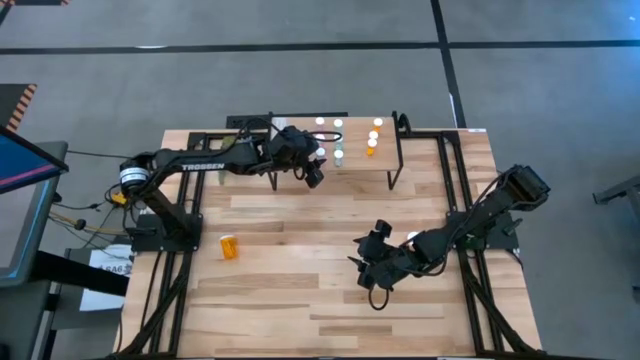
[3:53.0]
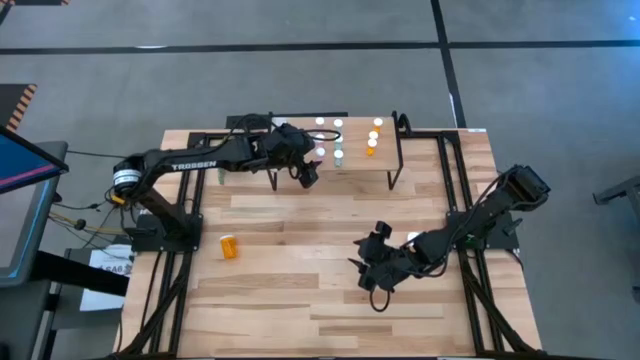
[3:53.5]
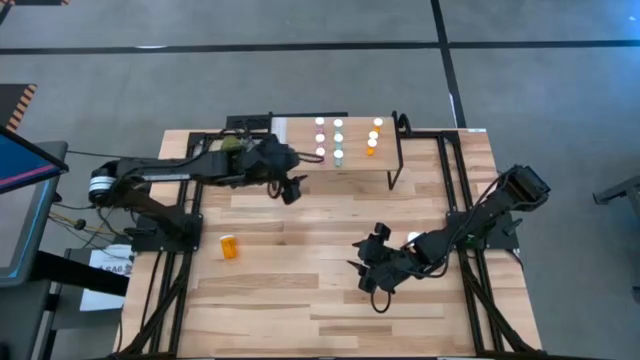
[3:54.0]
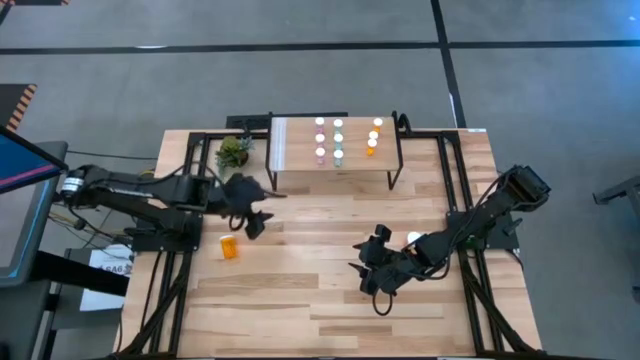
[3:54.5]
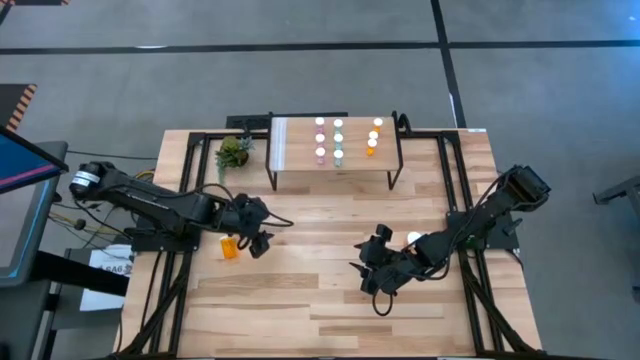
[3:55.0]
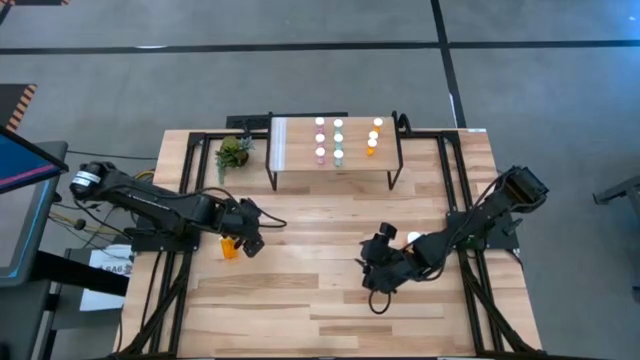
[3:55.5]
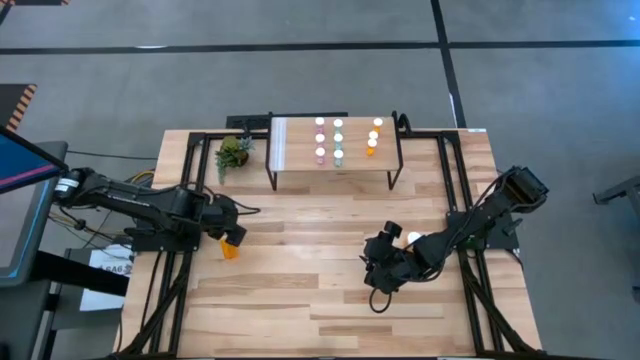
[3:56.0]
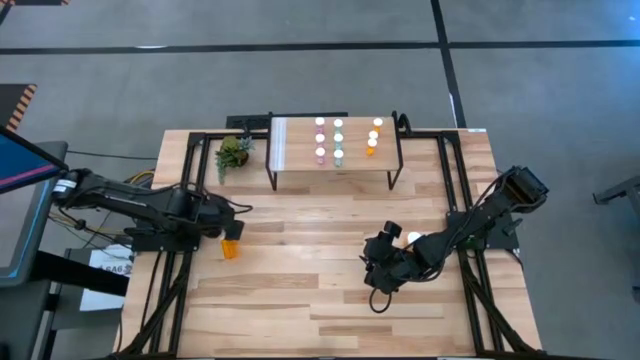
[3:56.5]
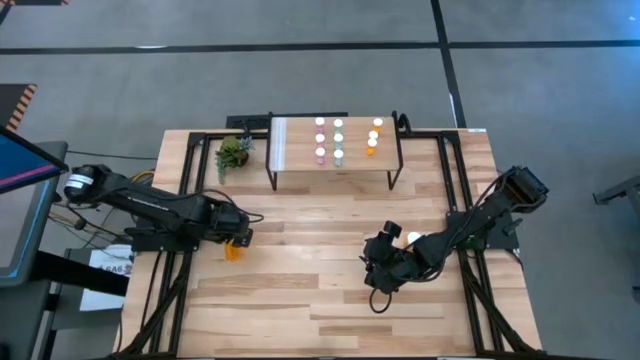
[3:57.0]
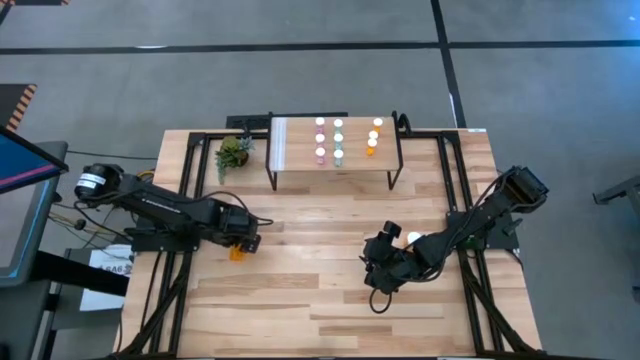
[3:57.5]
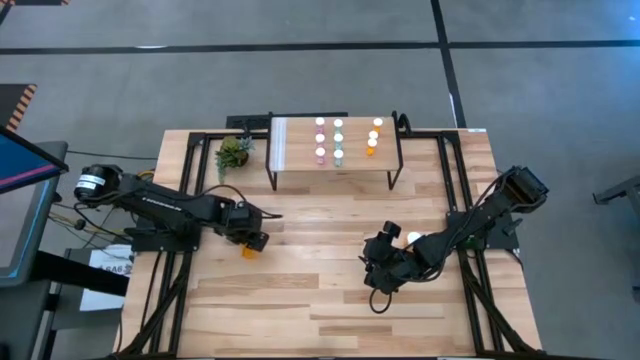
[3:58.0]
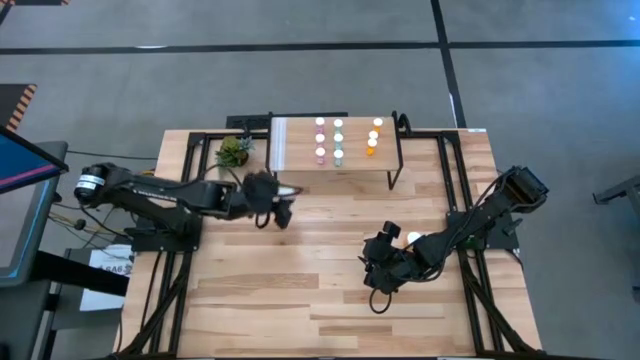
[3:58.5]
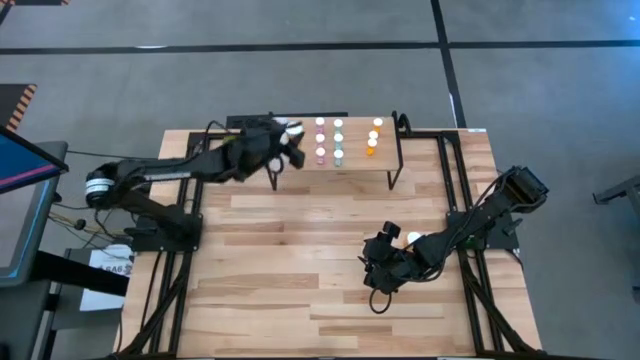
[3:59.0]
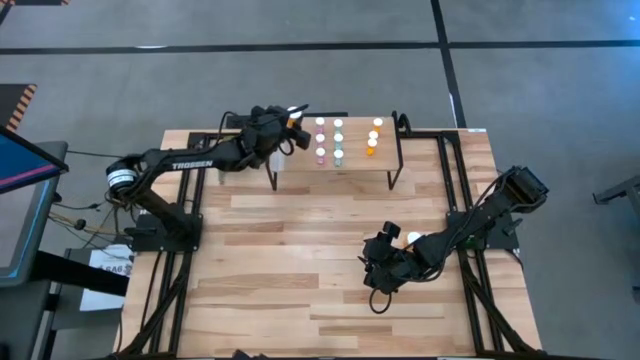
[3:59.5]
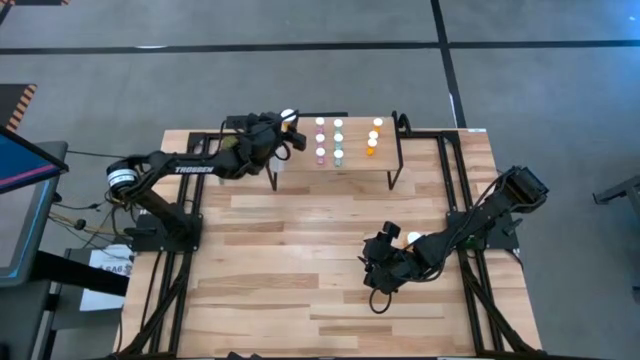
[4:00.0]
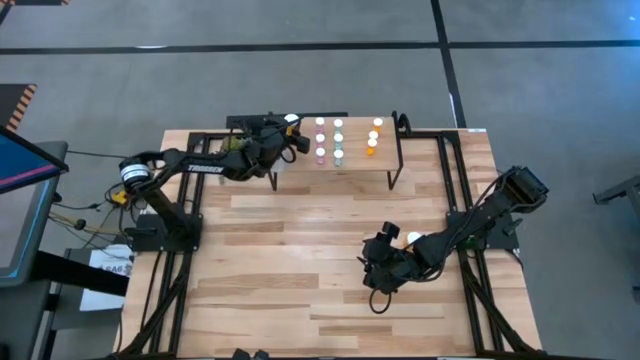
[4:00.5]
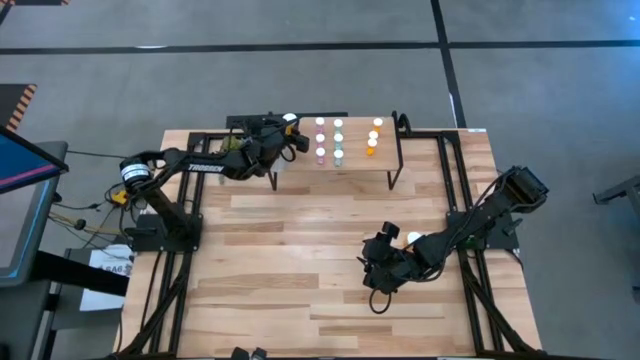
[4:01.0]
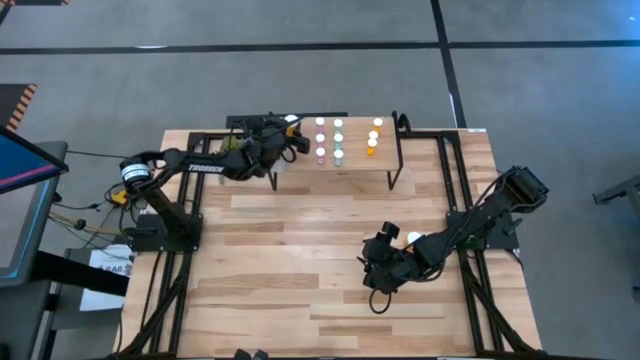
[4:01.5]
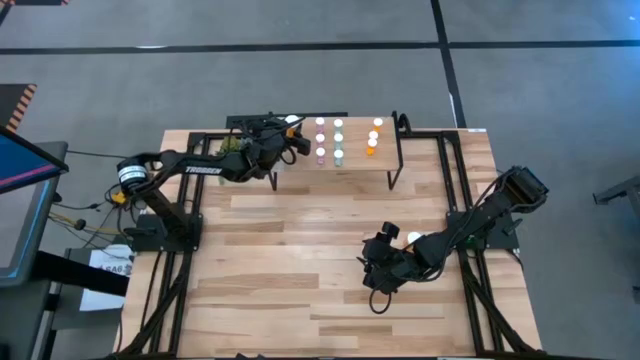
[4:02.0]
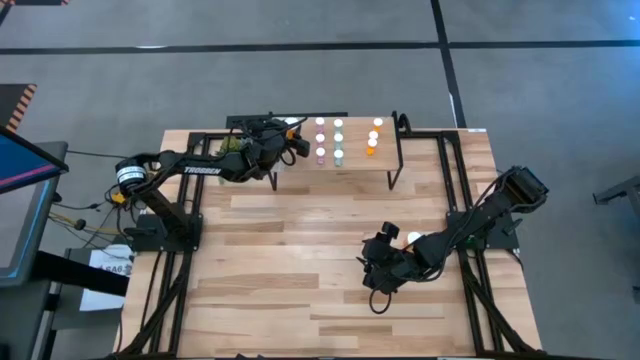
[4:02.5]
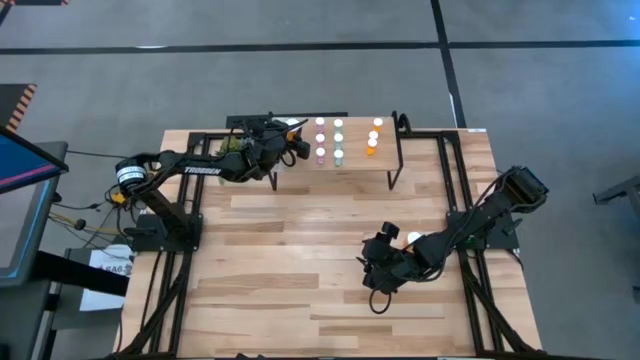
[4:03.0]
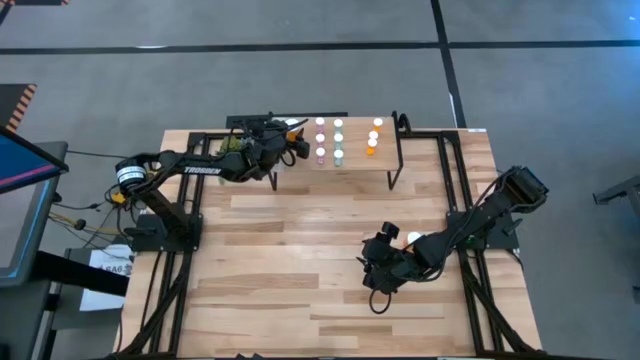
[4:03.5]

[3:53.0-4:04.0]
Task: Pick and place medicine bottles onto shelf by color
Put the left big orange pill bottle on the shelf

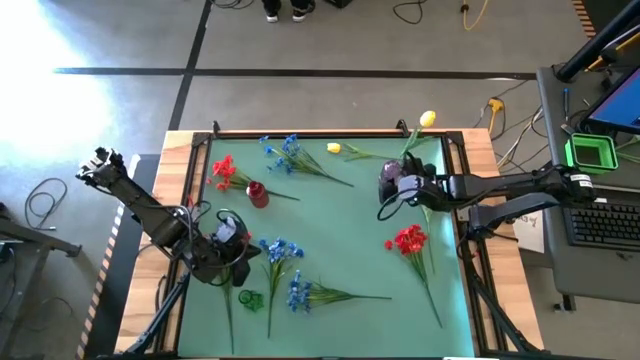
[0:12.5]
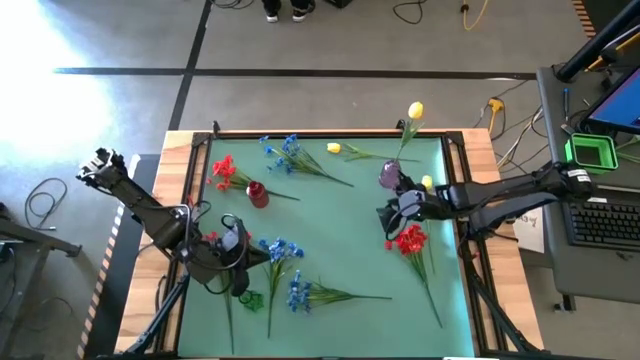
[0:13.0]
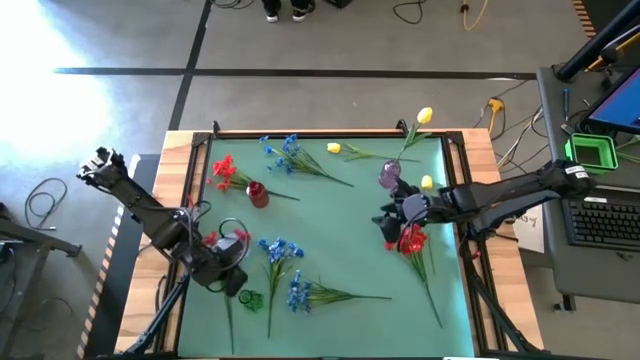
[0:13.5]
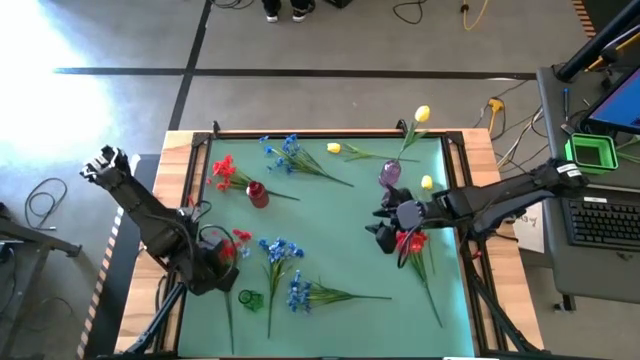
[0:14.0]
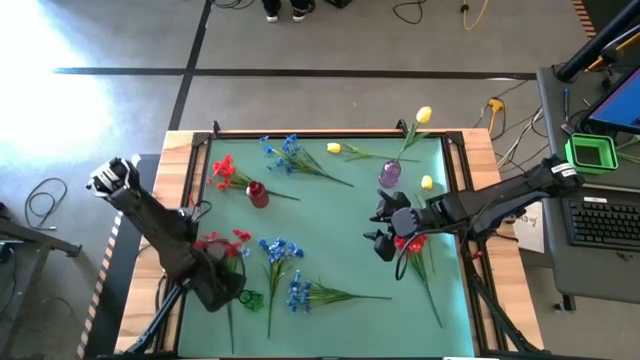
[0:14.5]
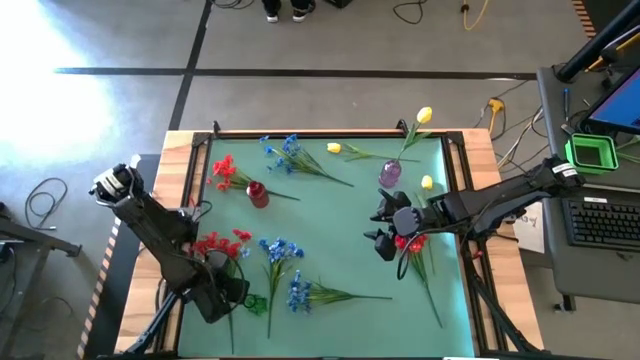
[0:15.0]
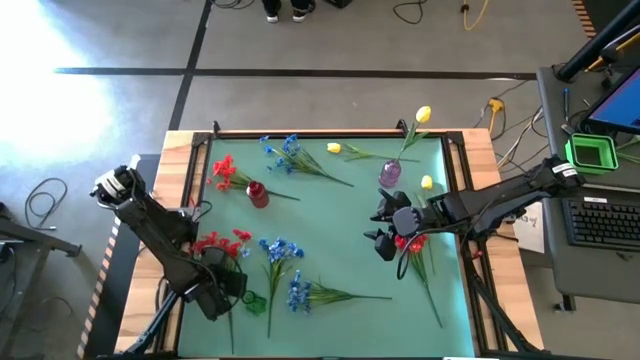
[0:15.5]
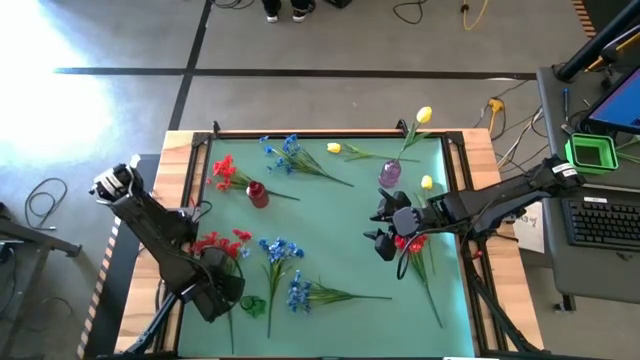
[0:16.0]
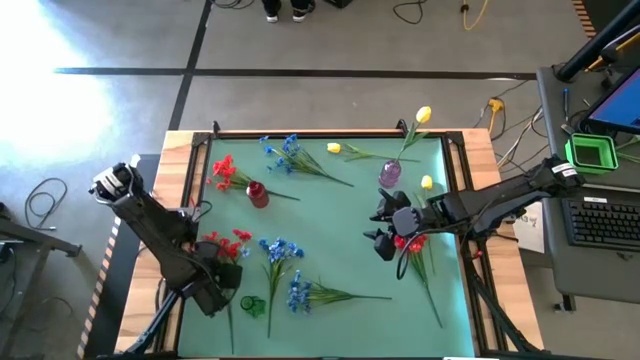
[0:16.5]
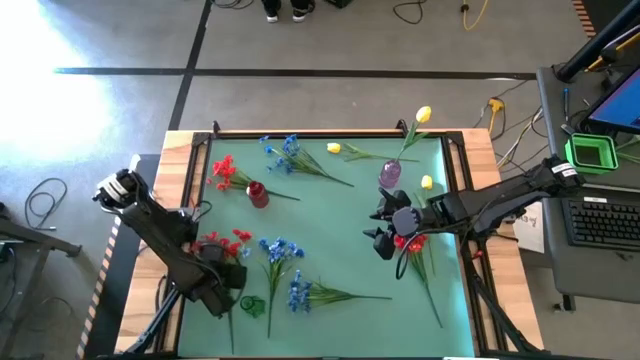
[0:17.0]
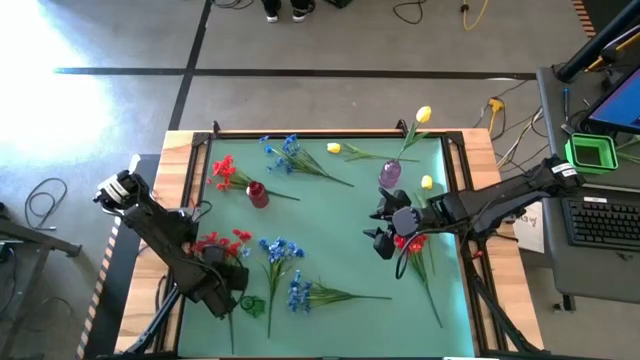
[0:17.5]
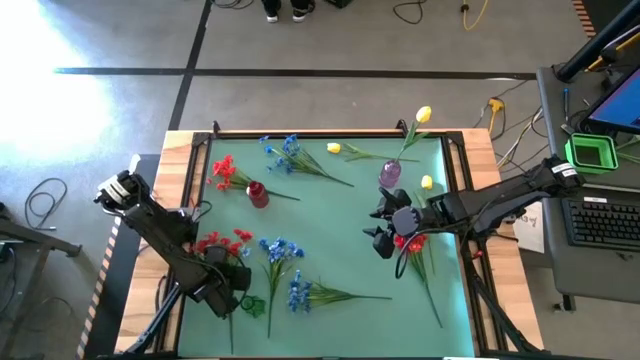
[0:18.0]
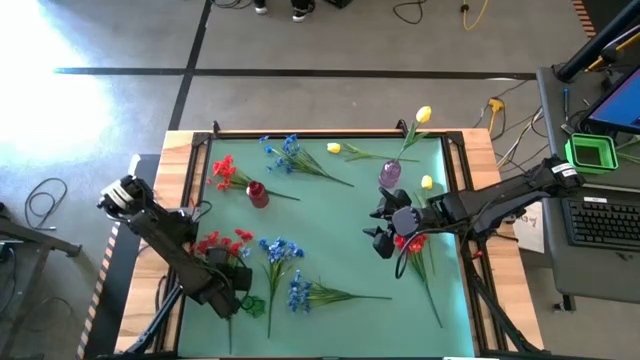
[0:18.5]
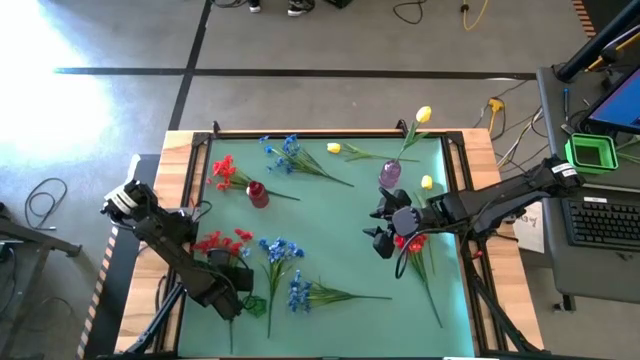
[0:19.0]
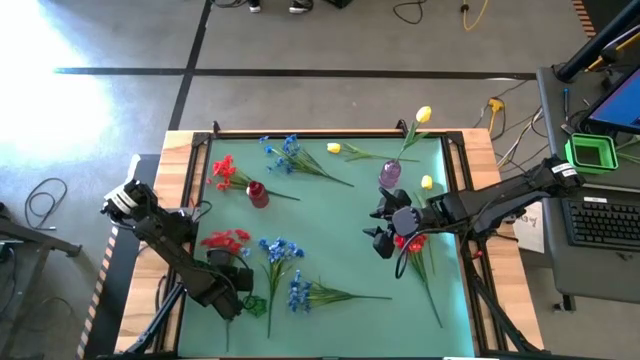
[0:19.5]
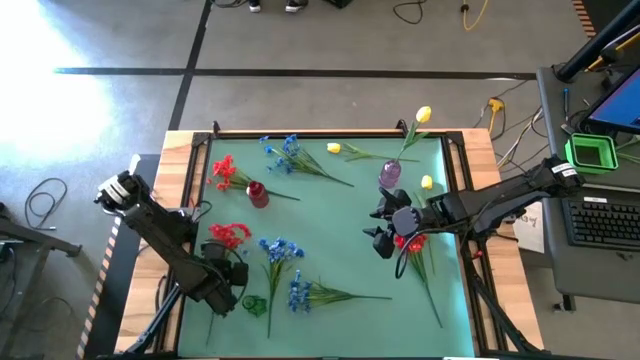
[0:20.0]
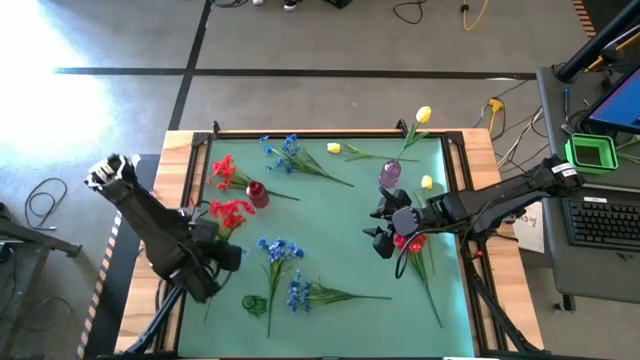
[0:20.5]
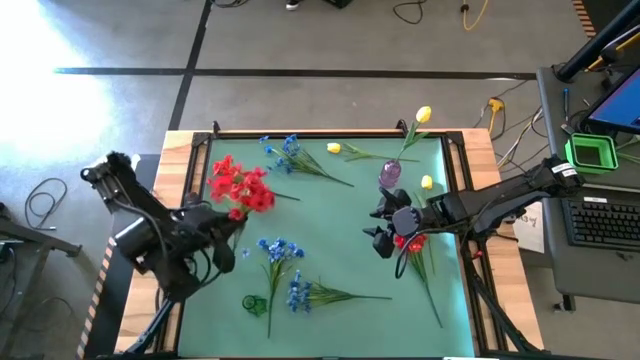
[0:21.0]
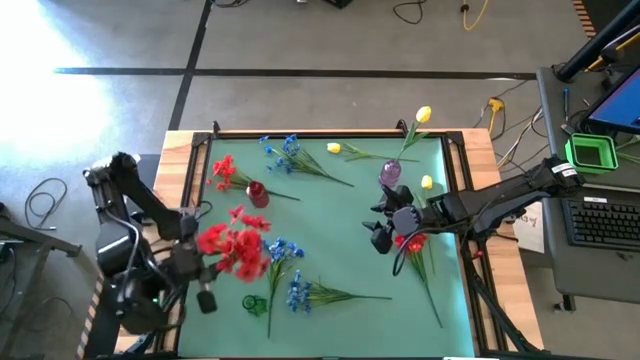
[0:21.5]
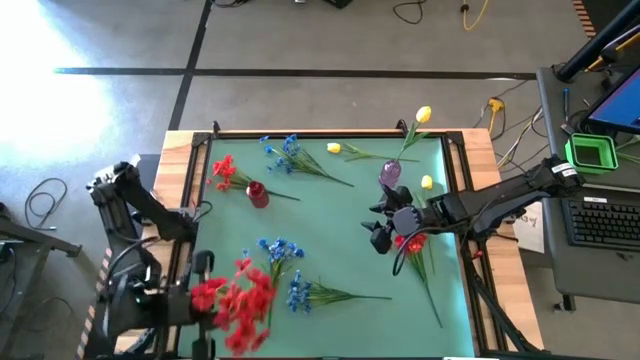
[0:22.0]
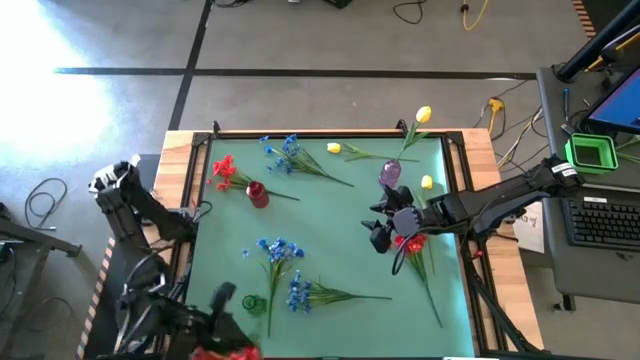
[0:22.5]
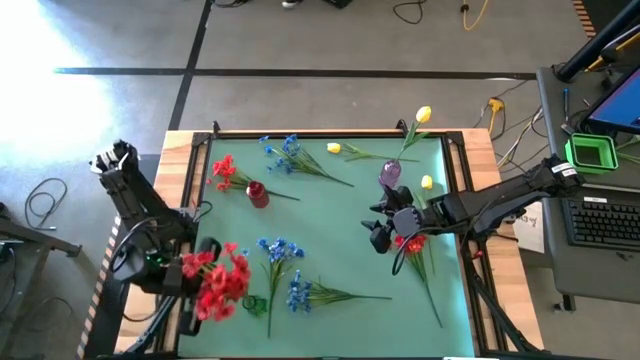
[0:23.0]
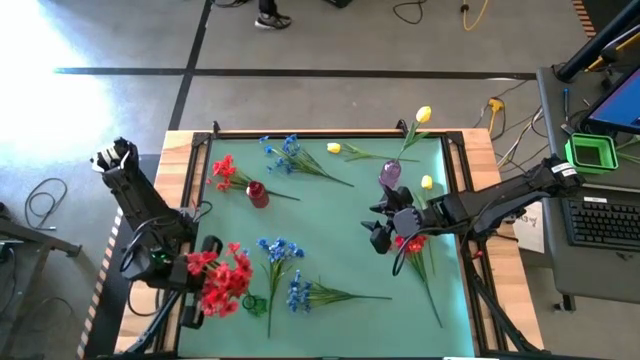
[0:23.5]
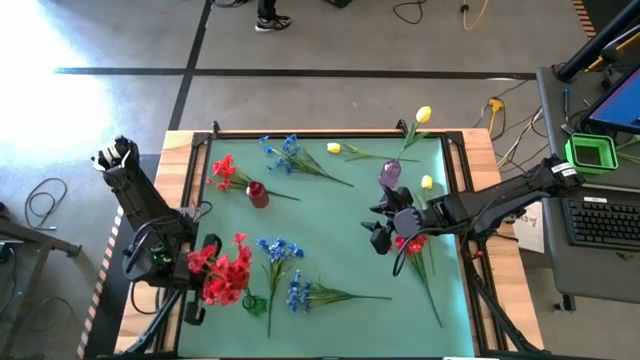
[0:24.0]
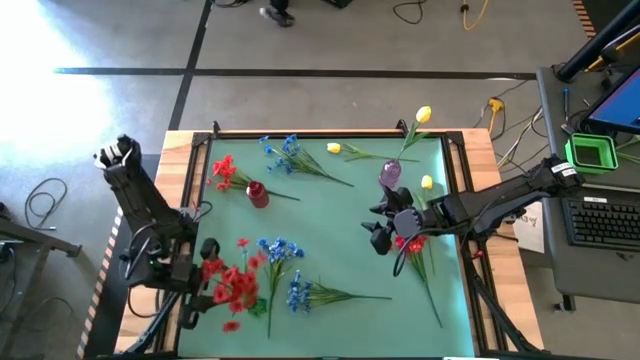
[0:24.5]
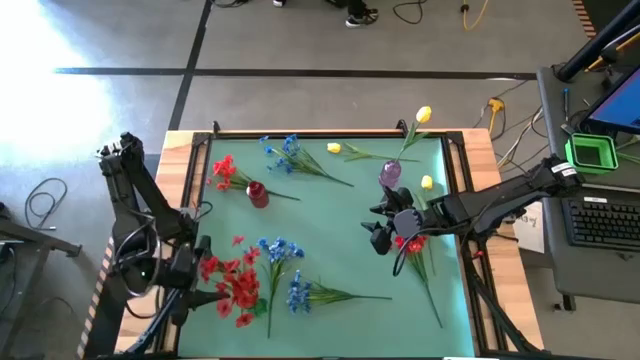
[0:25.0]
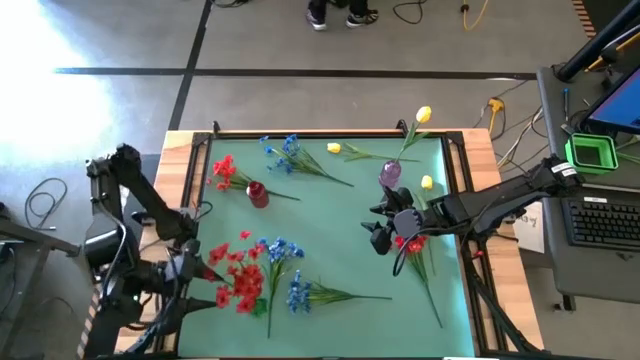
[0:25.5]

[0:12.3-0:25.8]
Task: Sort flowers into vase by color
Put the bottom left red flower into the green vase
